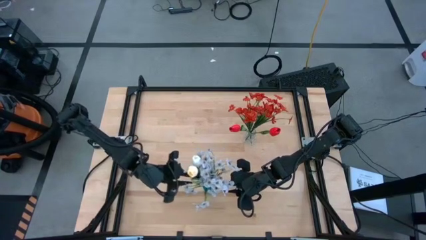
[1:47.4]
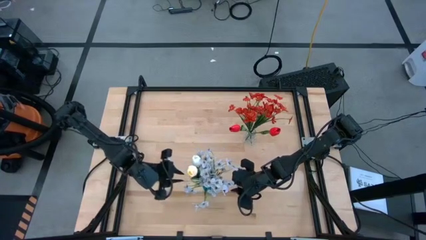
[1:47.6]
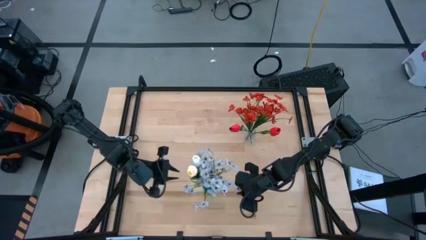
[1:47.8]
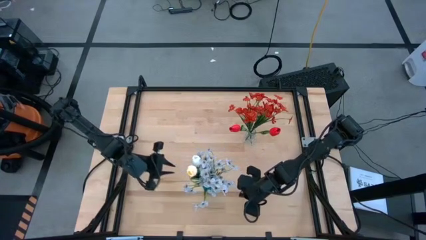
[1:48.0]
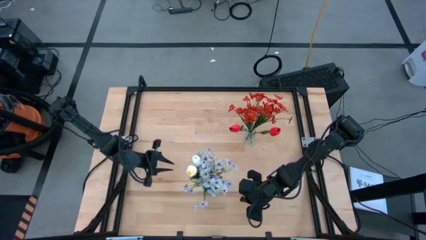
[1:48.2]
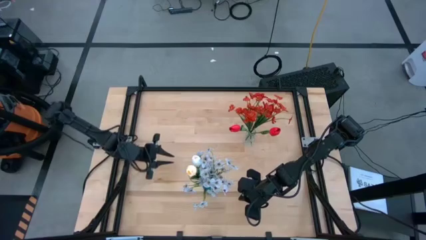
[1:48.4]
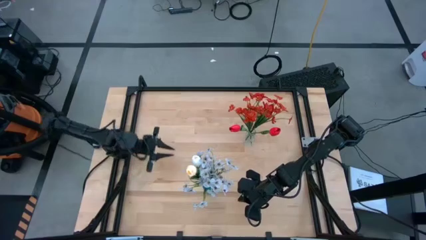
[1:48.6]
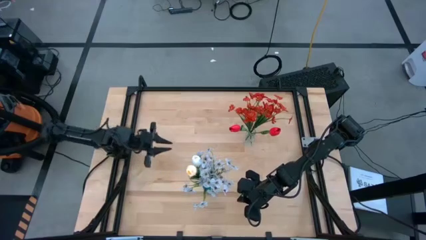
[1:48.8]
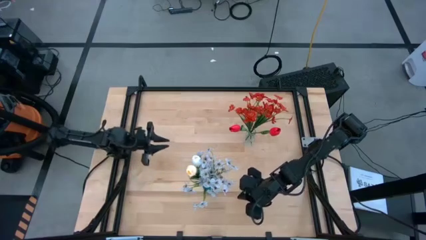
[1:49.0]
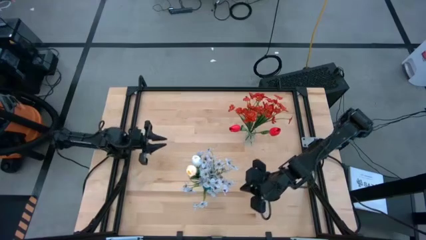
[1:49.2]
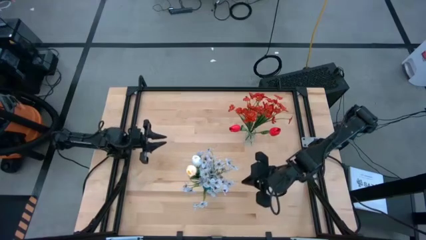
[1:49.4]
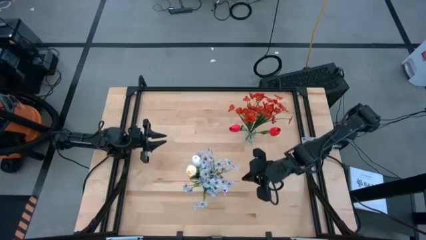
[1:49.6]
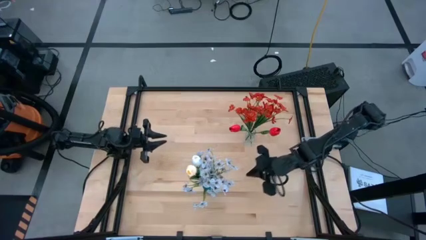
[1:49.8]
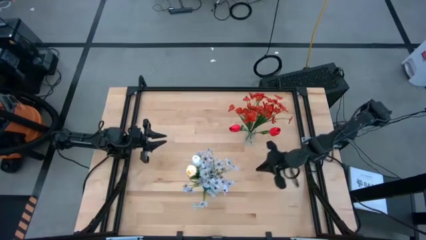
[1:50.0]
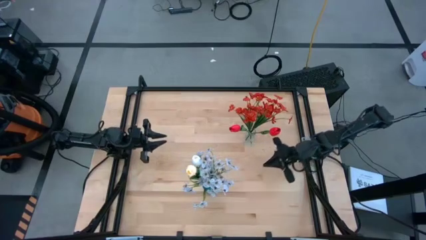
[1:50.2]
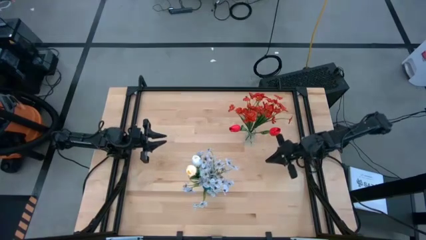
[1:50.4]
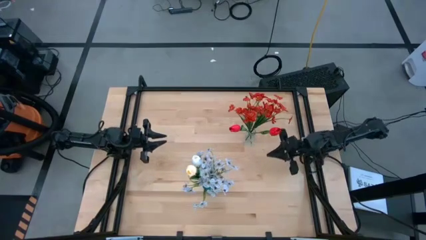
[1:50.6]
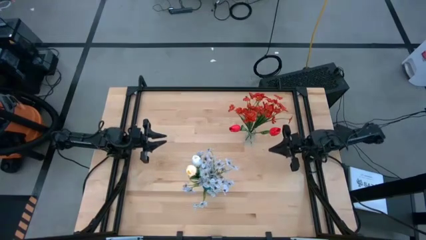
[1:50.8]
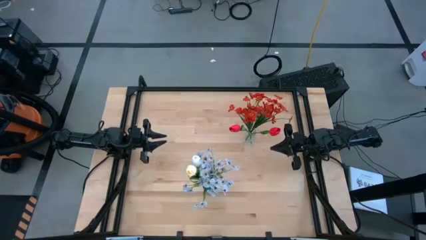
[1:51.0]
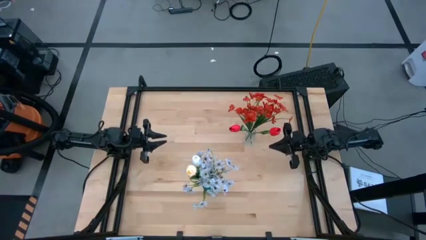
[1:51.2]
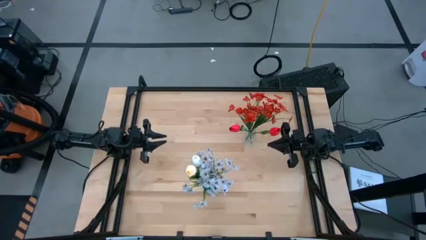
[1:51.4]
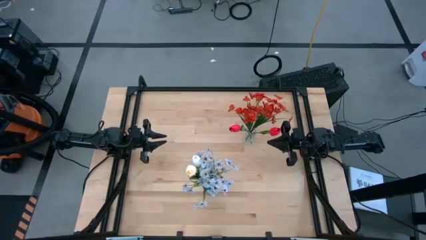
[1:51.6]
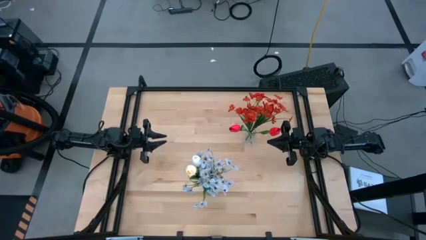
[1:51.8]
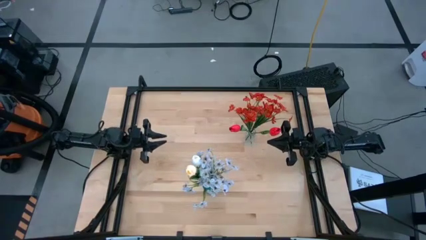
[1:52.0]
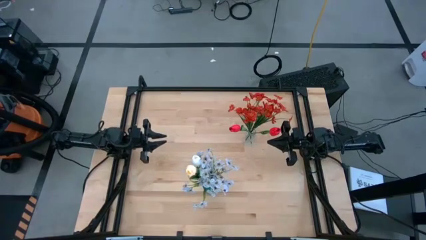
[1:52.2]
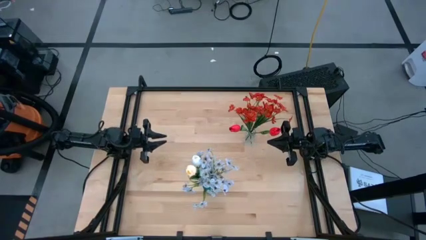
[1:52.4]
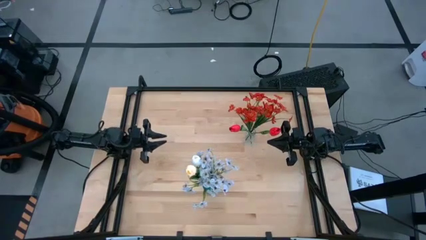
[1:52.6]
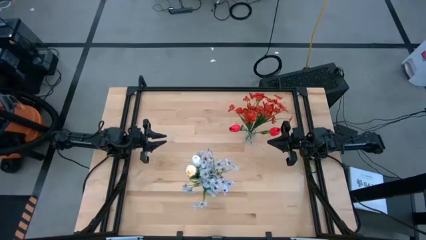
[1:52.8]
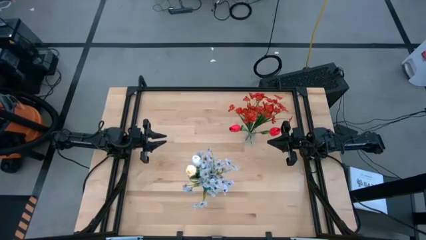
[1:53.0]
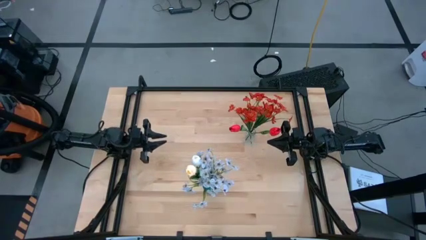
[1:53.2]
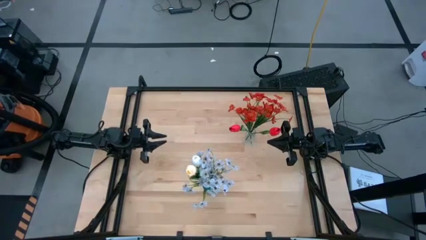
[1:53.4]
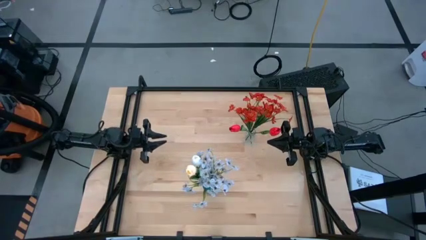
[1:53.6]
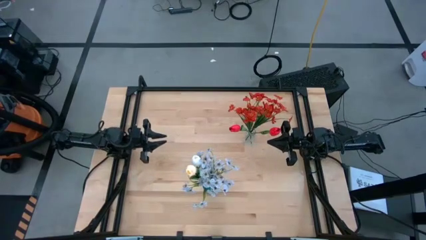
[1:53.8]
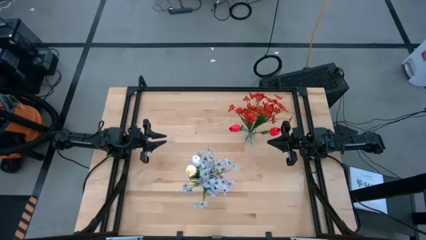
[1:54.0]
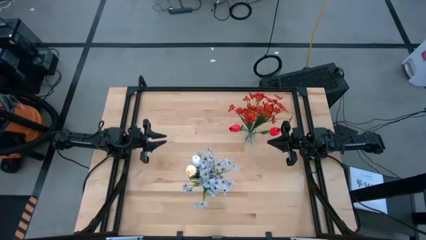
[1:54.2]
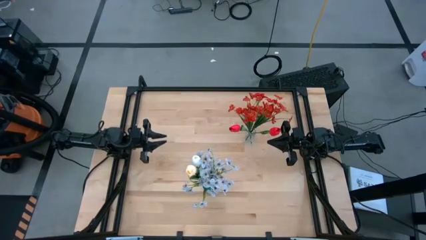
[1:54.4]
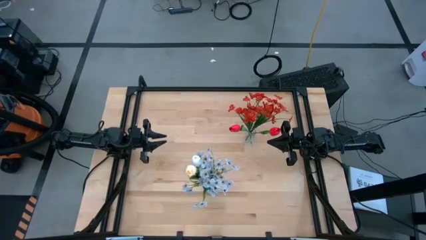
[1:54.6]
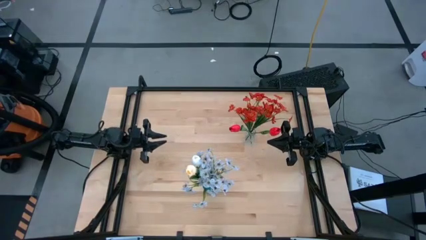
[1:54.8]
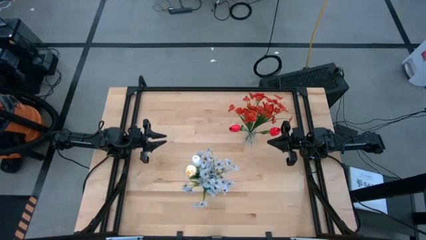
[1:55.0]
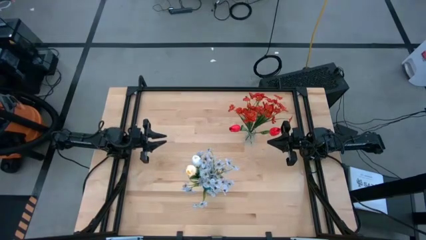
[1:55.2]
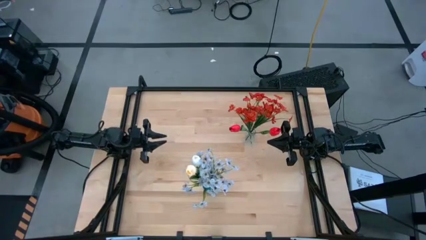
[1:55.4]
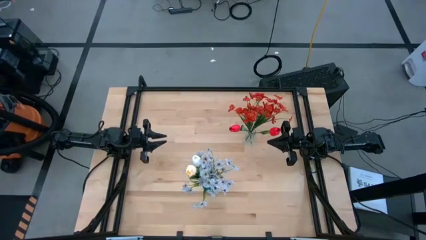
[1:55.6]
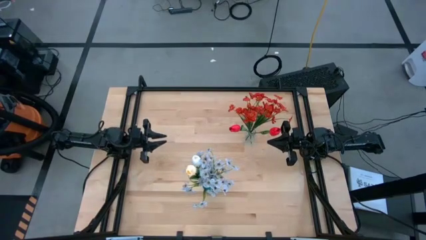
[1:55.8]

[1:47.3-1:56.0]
Task: Sort flowers into vase by color
Return to Home Position

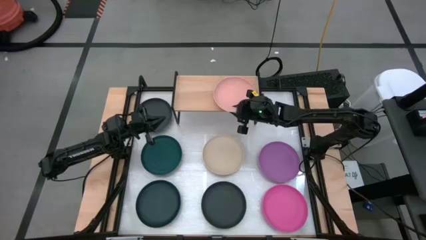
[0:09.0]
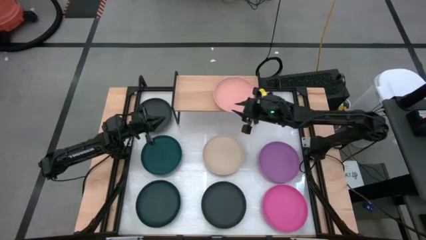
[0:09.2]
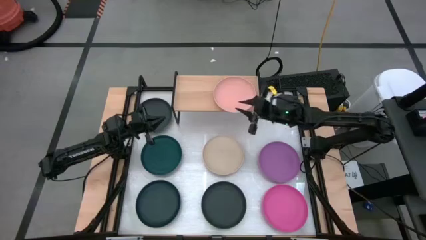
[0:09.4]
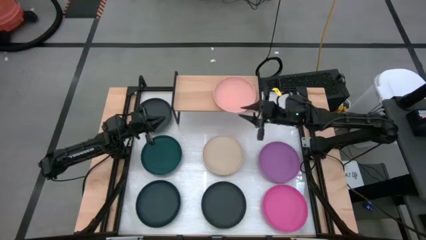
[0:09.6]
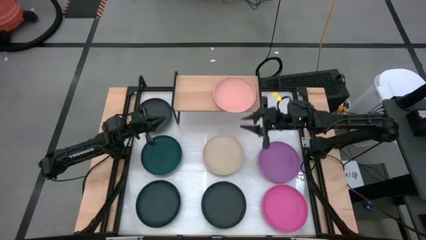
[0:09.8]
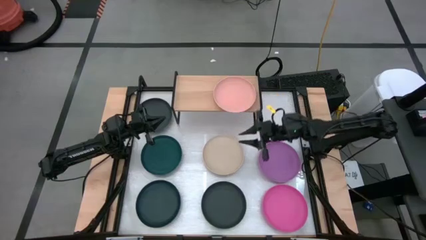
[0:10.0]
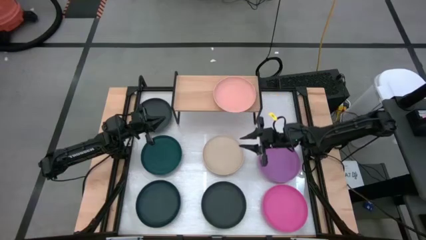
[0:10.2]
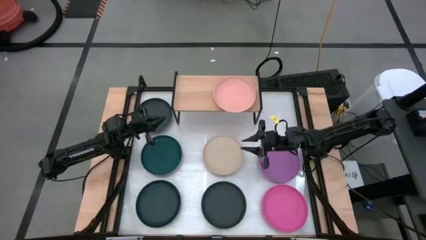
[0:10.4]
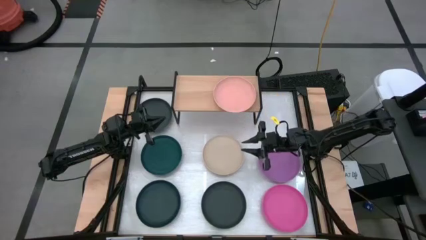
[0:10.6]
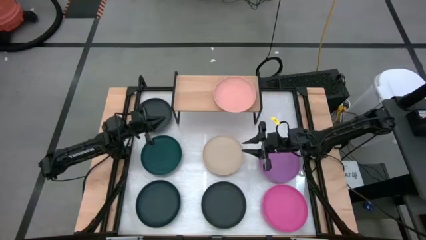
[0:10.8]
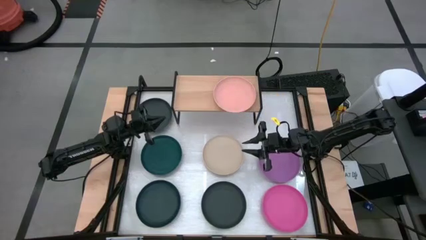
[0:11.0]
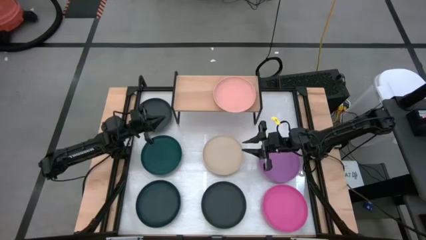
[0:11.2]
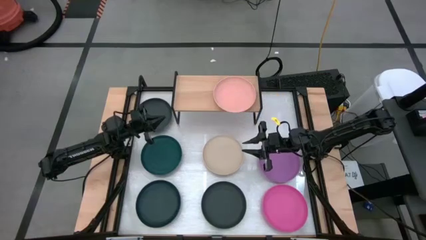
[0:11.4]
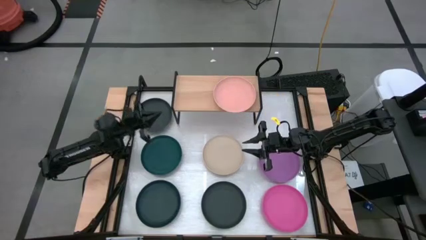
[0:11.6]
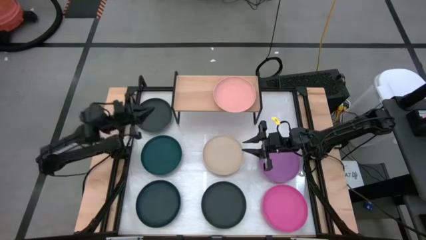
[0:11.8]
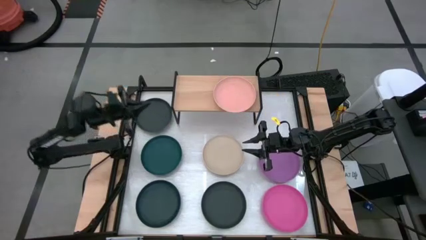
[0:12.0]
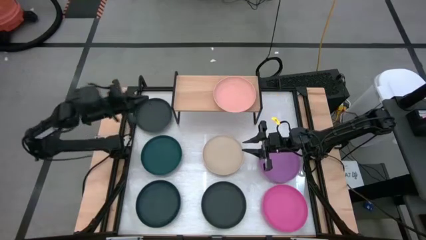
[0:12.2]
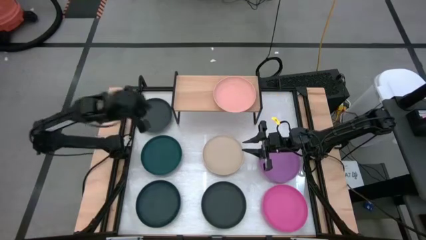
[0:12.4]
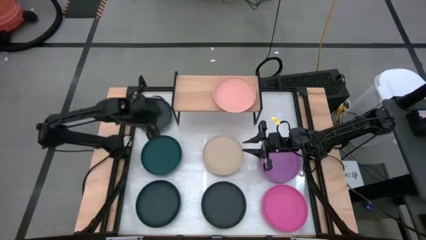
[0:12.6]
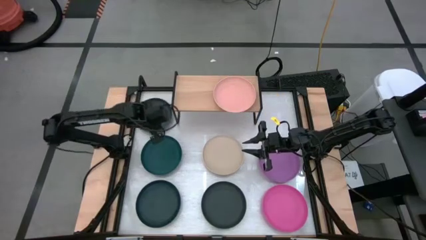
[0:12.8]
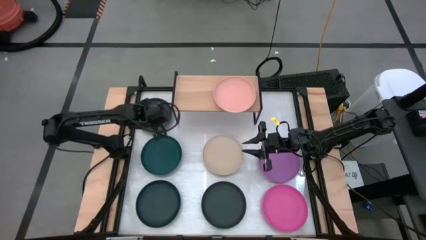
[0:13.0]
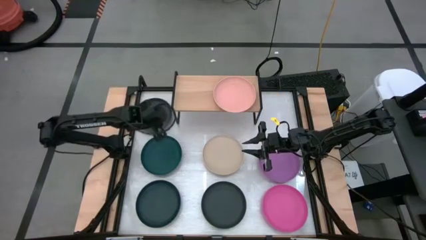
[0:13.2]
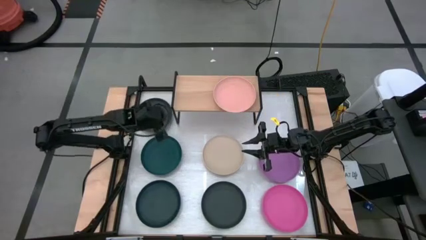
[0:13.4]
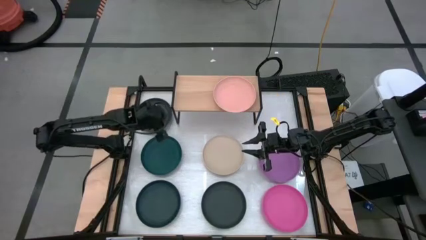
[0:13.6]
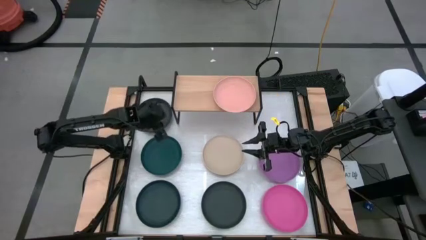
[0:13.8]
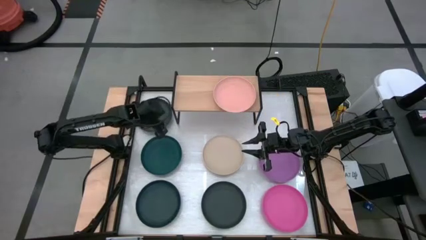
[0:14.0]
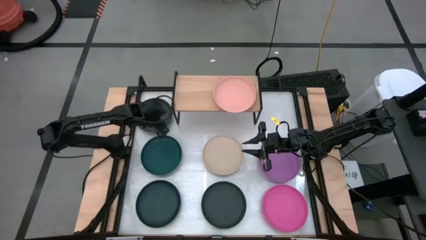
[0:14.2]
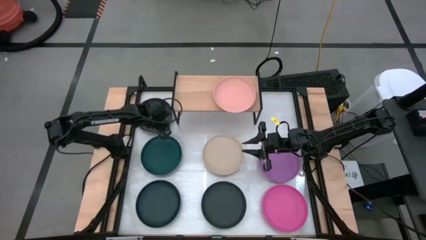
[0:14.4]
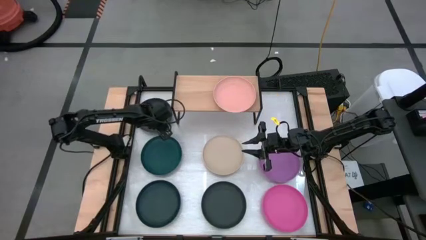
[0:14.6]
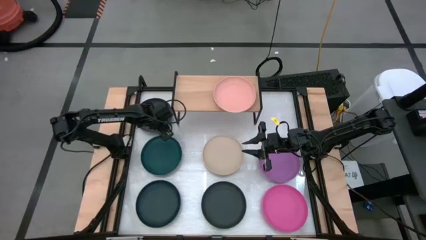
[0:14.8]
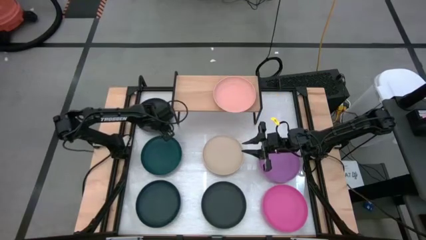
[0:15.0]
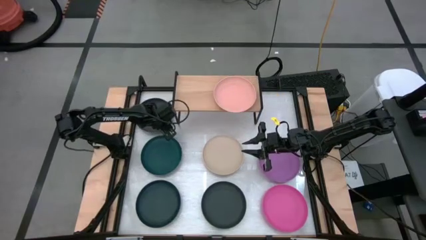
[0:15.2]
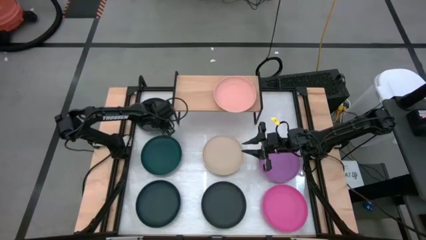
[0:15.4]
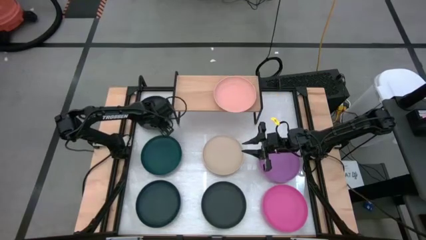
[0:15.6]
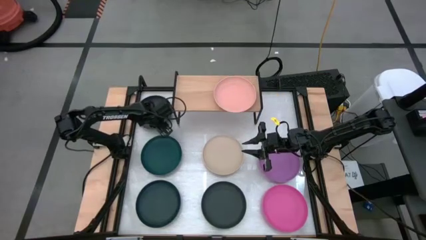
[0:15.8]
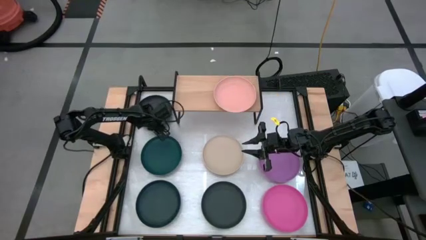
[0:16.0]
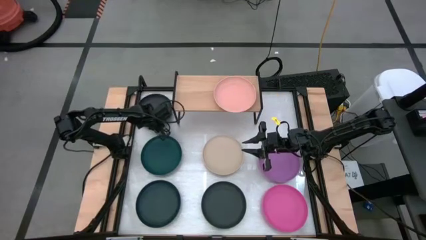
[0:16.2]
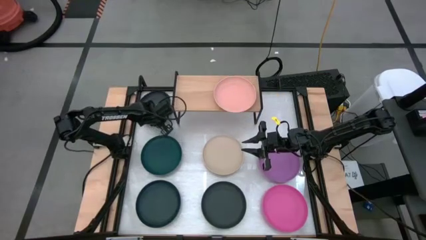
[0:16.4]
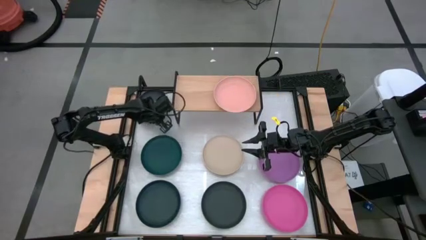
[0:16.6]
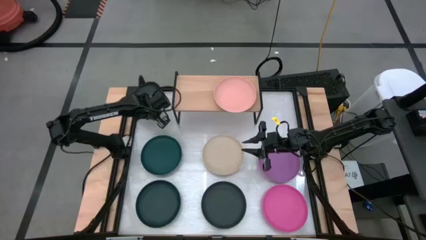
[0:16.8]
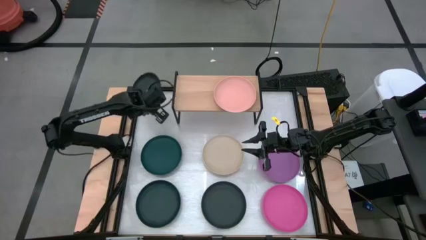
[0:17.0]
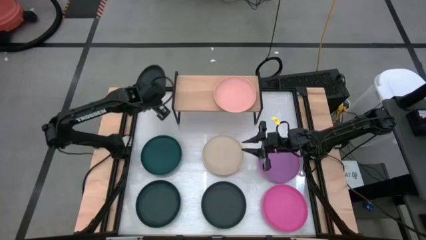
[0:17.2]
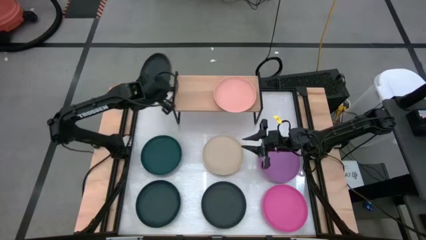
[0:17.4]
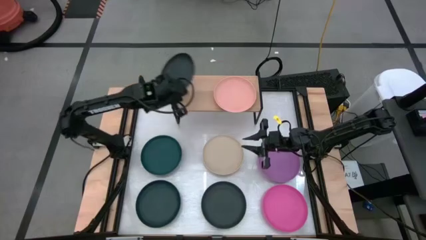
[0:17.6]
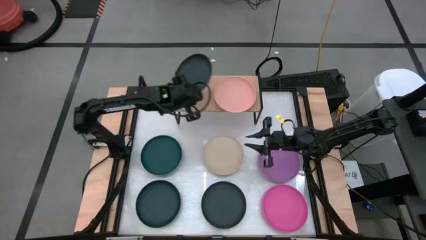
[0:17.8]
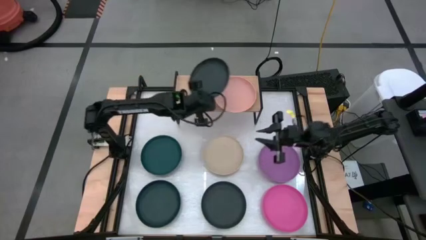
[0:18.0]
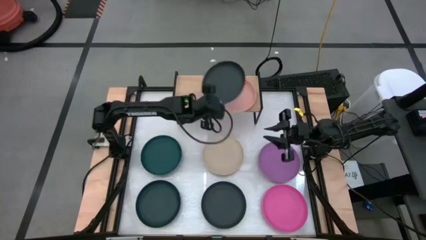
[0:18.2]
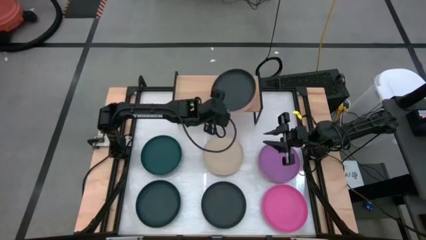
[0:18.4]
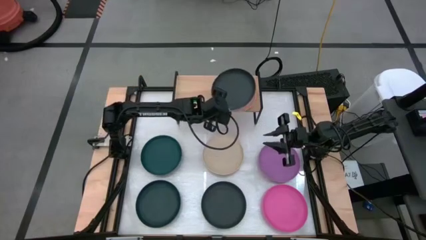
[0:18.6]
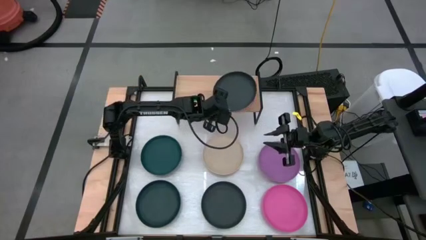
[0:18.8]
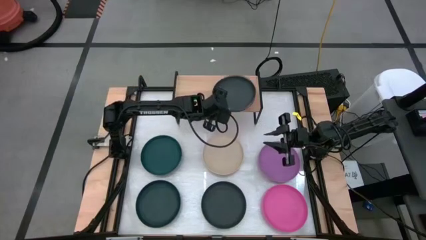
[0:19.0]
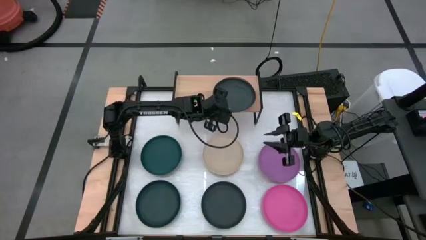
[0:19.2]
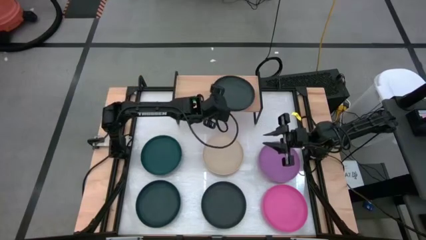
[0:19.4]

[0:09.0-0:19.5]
Task: Place and stack plates onto a shelf
Stack the top black plate on top of the brown plate on the shelf
